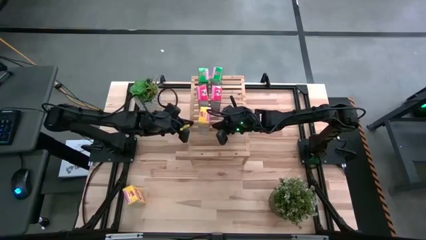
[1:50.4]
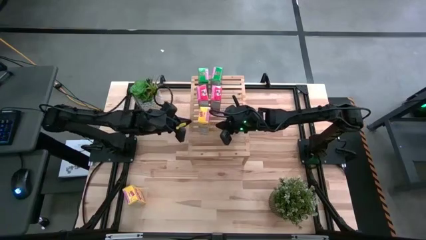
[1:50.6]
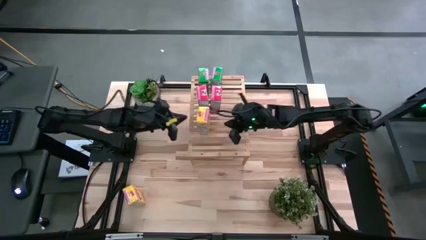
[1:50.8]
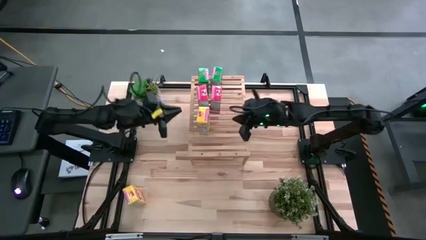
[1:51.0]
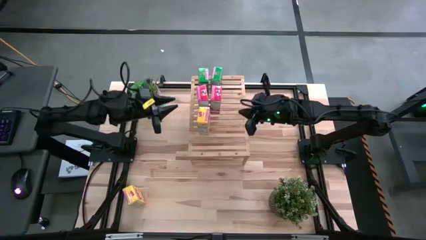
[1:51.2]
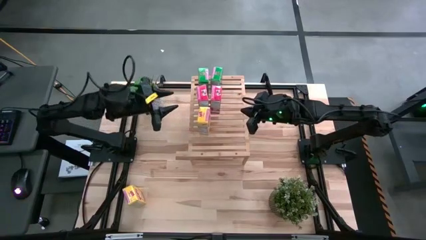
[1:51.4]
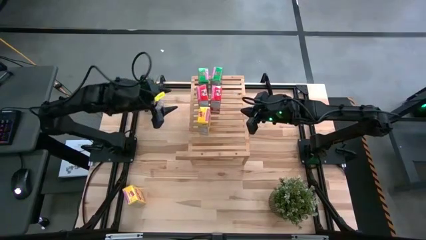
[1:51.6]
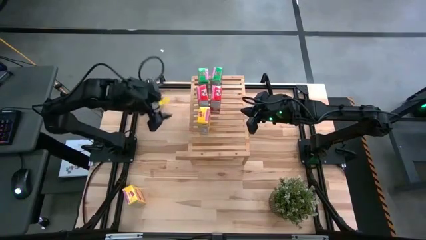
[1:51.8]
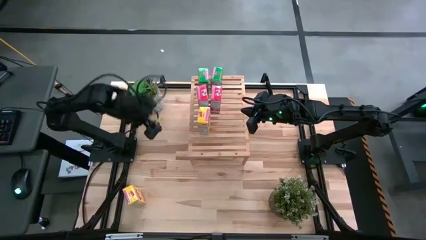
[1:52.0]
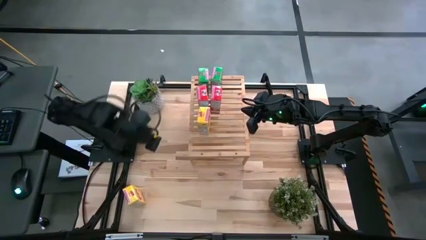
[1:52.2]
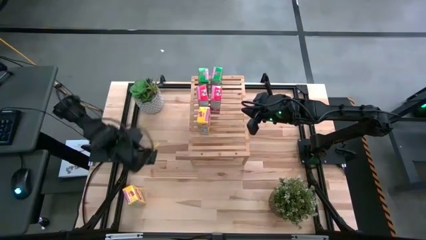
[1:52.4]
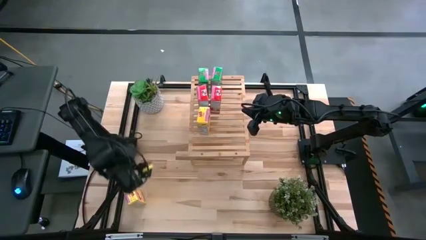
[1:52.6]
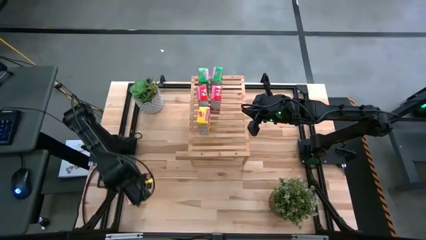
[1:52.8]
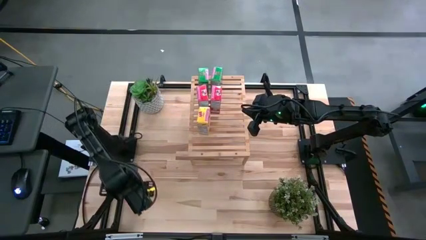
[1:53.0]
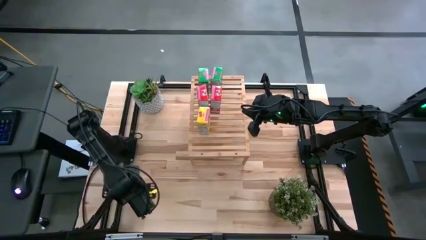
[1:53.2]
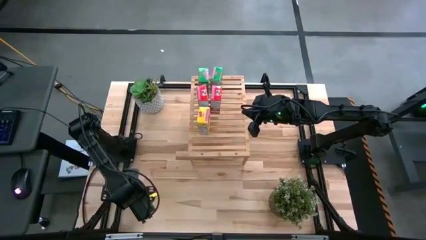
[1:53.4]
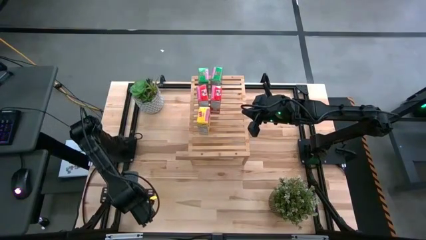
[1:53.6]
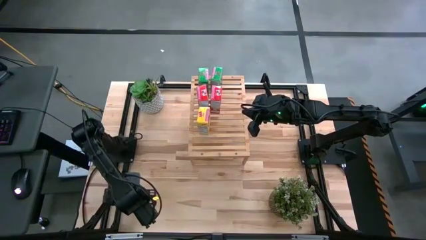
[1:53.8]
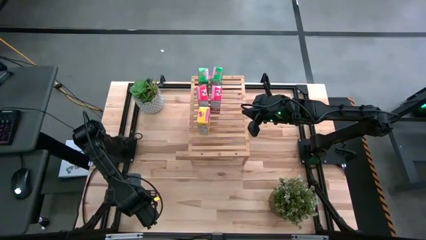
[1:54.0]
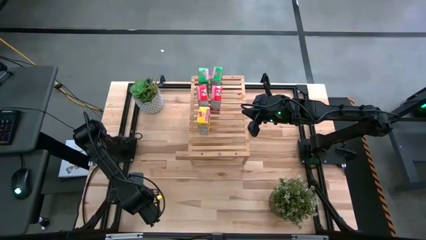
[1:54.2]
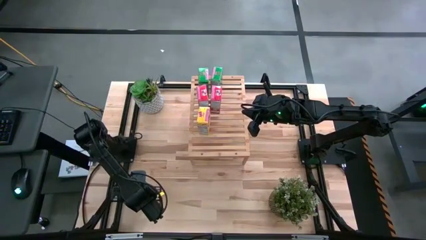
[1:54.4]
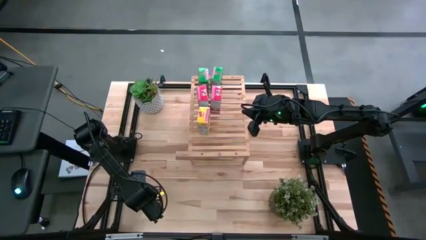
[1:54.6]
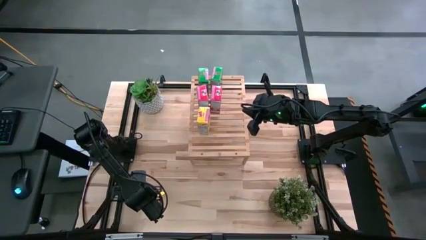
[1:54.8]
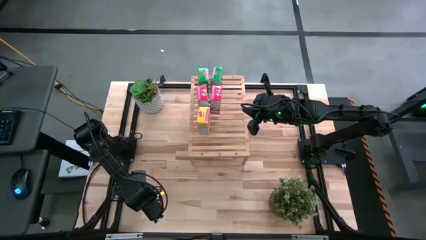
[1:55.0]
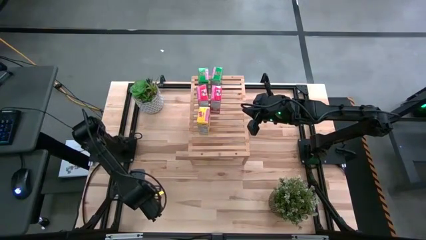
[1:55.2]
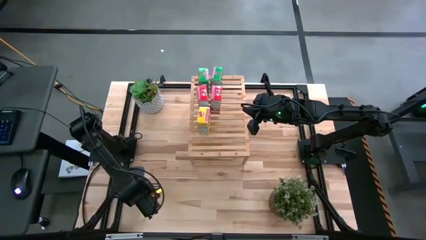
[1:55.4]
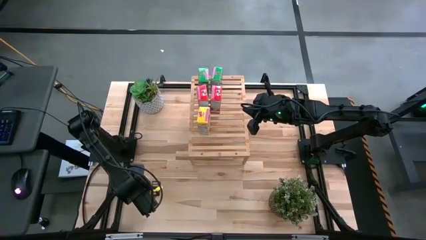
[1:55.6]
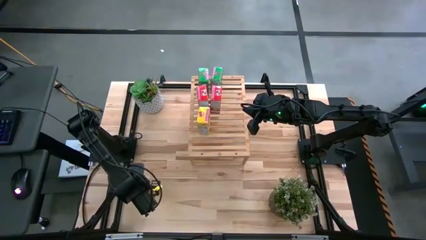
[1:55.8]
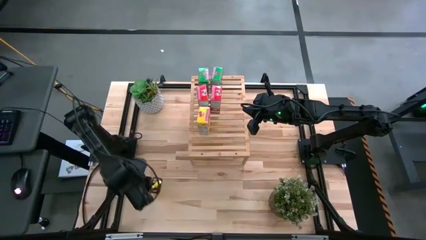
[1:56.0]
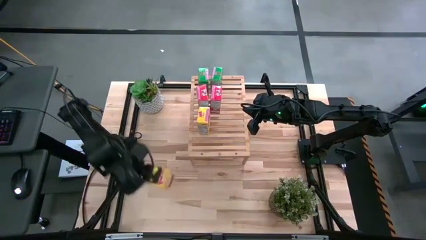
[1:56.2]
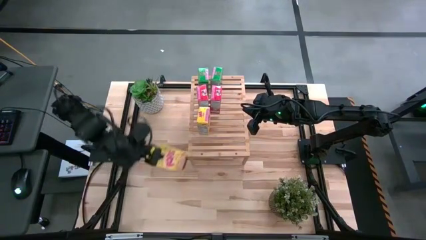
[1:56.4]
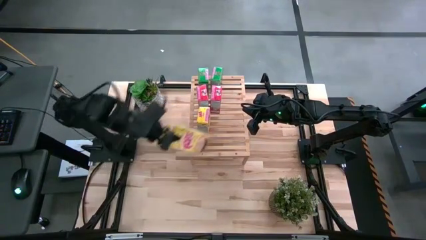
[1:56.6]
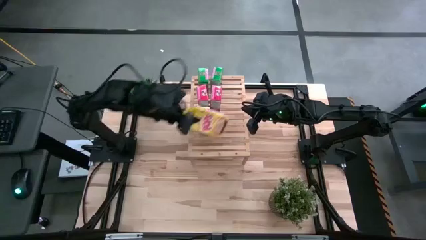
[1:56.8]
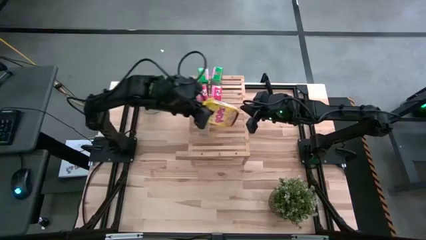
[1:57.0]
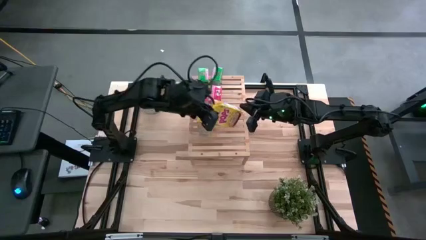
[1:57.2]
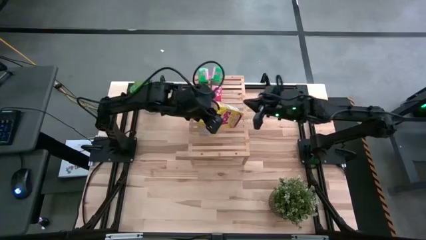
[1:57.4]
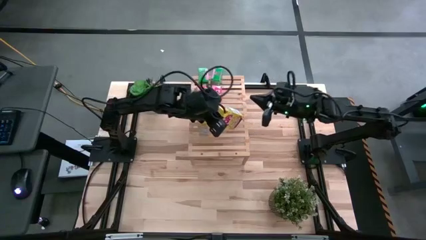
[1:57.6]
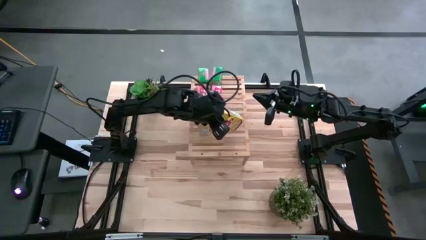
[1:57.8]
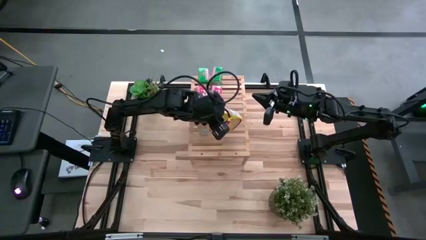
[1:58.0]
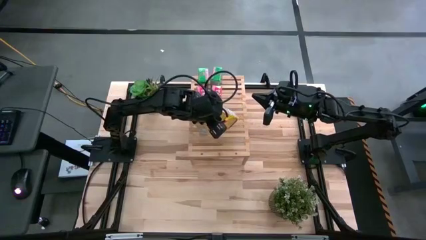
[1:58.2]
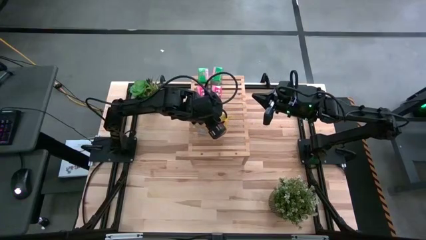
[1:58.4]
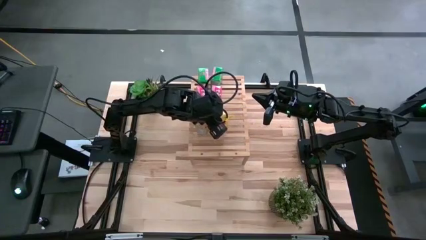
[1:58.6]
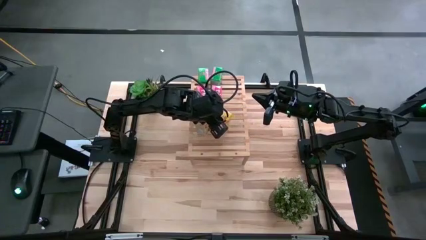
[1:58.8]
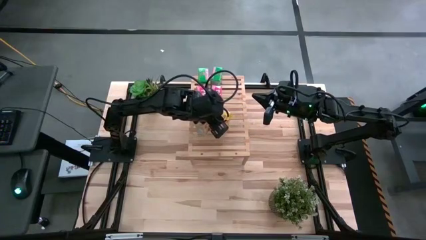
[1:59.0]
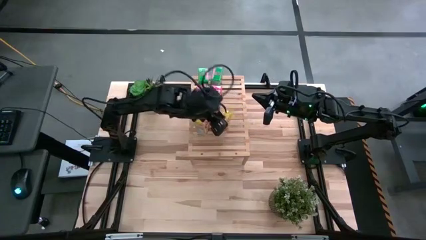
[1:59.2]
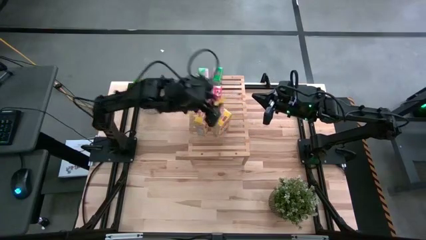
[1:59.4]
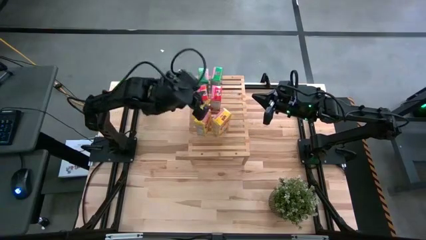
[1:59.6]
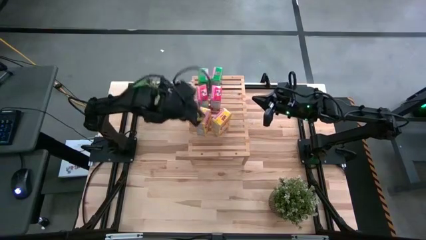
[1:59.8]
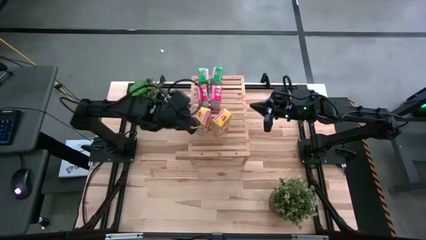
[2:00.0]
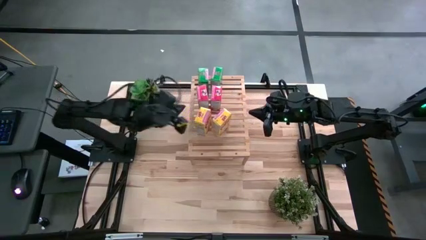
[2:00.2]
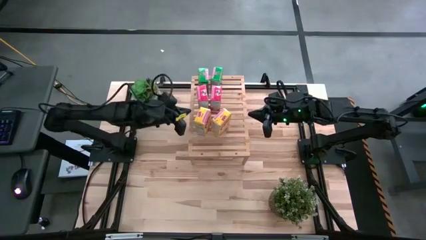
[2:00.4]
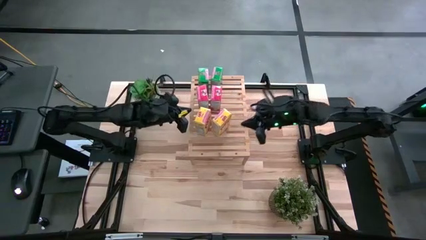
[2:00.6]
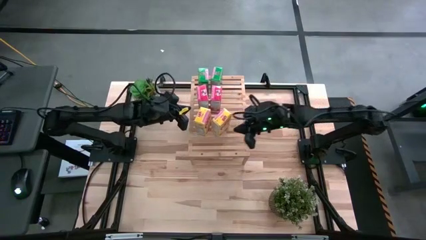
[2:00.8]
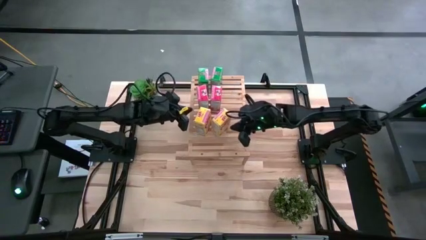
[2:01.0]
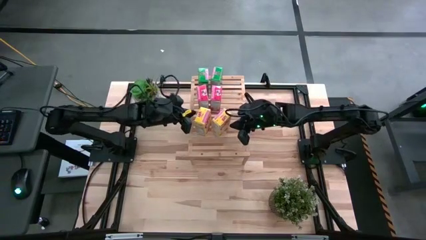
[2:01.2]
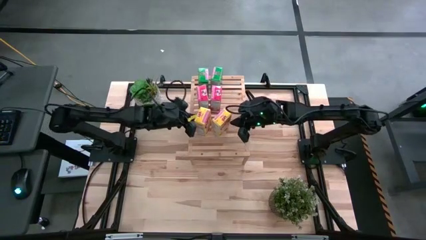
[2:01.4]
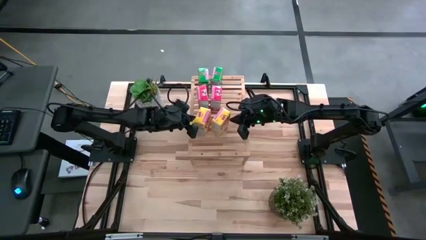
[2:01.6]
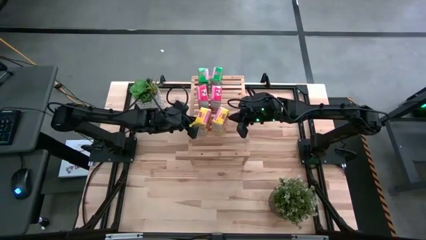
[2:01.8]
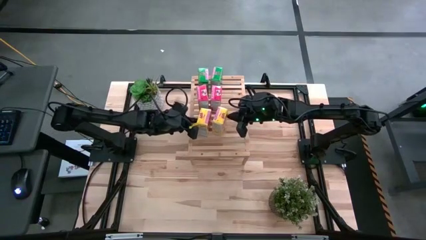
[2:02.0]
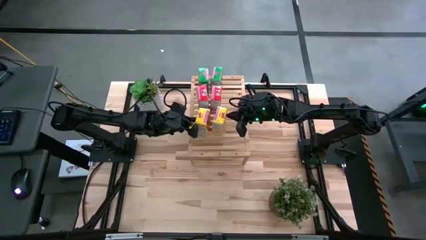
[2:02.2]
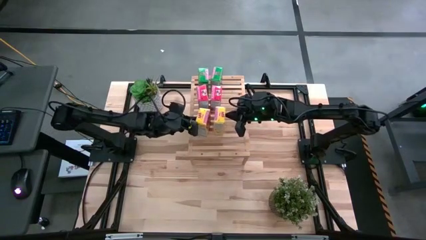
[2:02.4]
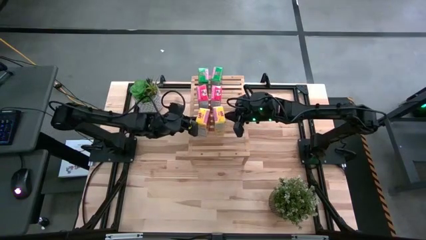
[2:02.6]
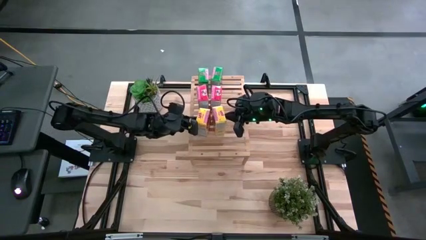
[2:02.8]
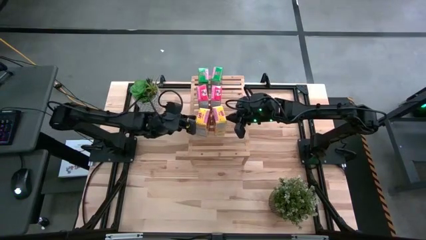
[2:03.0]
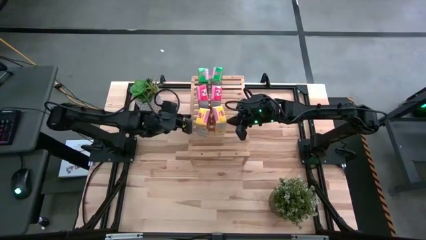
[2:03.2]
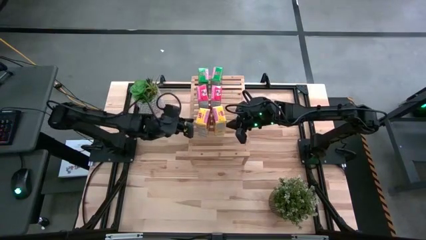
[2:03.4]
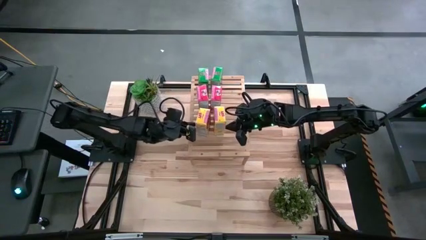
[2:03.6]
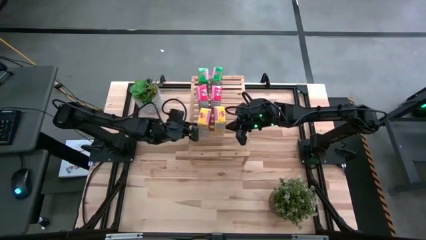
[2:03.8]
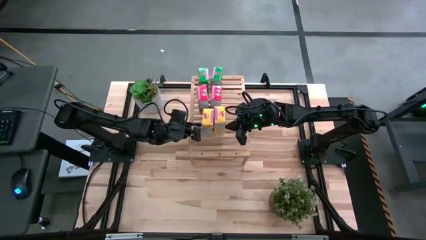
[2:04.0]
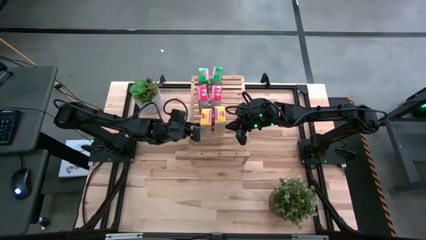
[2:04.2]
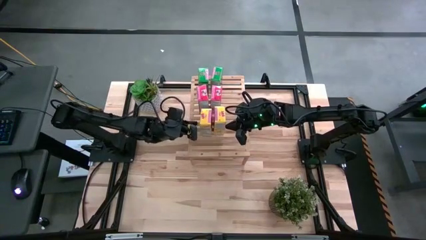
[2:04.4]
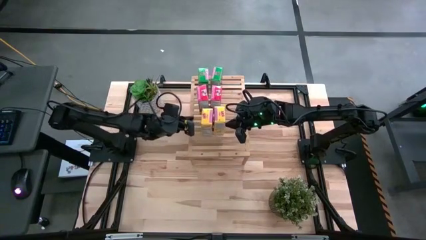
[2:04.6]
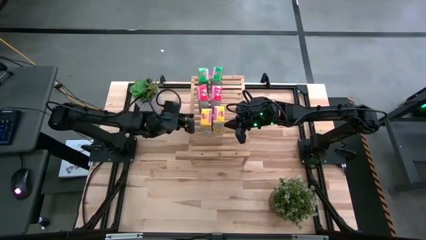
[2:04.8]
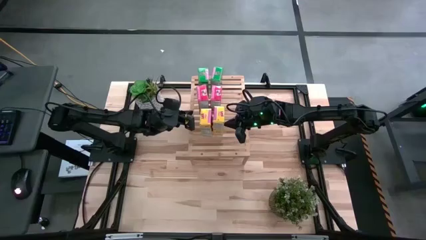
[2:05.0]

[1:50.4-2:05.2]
Task: Stack cereal on shelf
Put the yellow cereal box on the top shelf and align with the other yellow cereal box

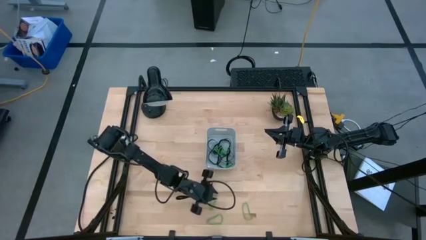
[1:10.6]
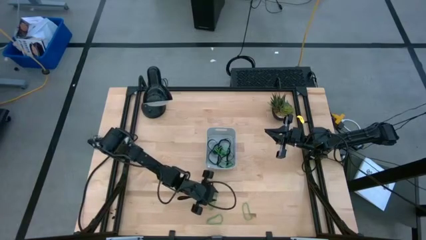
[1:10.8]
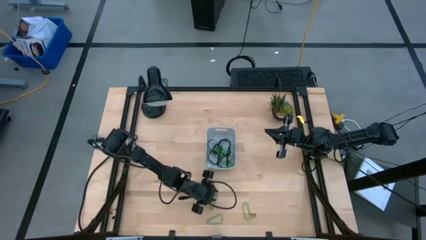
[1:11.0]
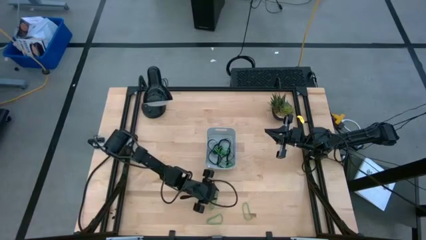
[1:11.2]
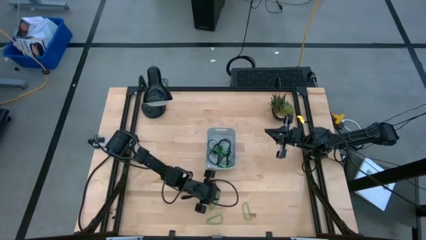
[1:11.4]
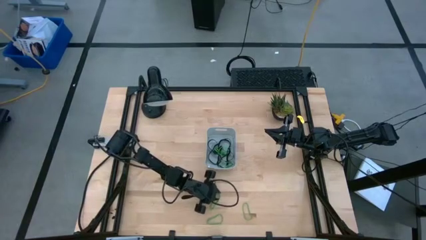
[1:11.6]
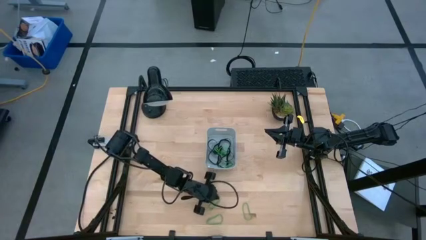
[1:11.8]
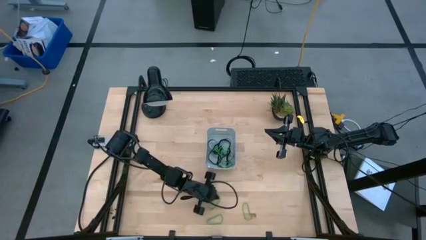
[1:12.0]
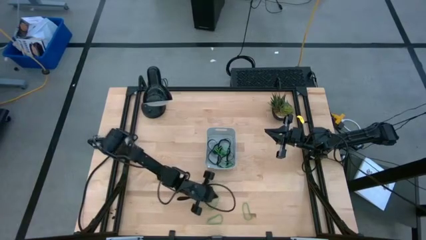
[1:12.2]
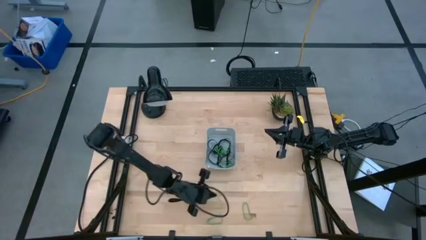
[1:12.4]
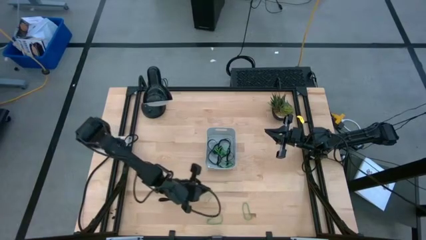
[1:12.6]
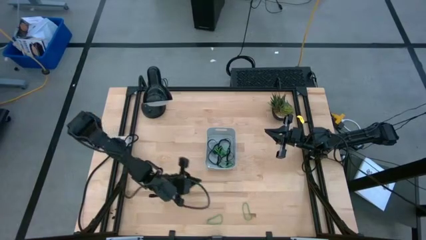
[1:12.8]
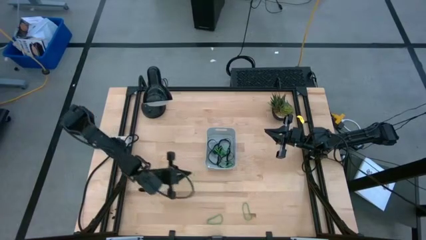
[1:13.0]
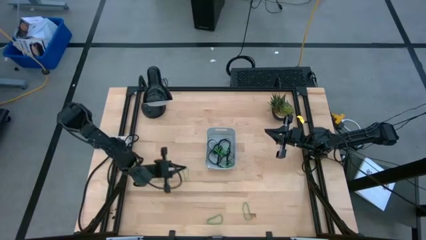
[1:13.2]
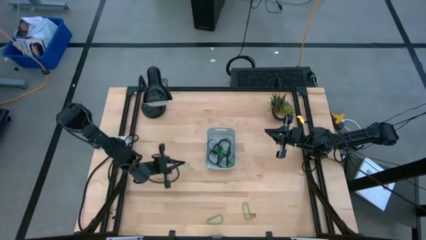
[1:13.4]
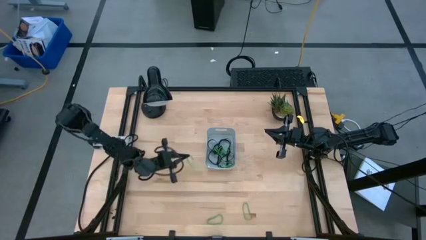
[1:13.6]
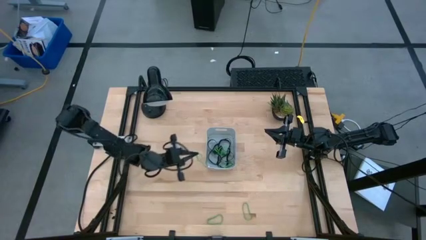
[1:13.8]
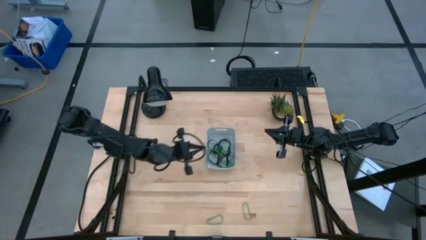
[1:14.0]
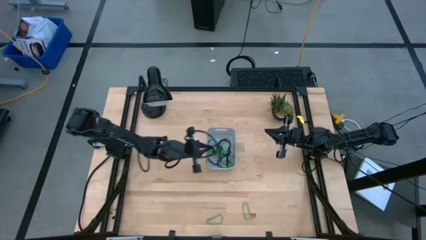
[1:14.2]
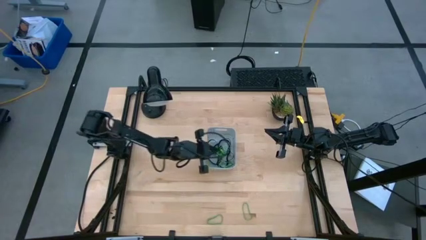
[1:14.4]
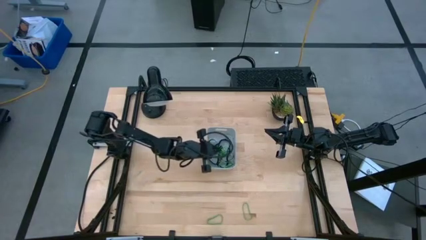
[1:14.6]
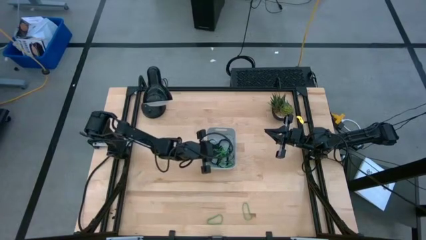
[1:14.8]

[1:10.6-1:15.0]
Task: Pick and place rubber bands into bin
Put the green rubber band into the gray bin
